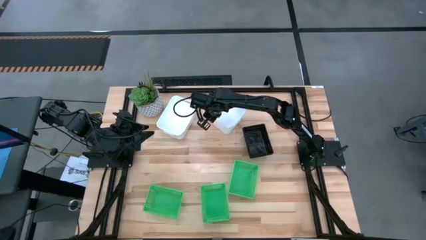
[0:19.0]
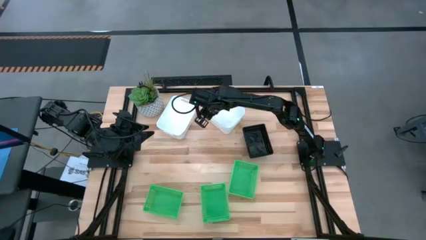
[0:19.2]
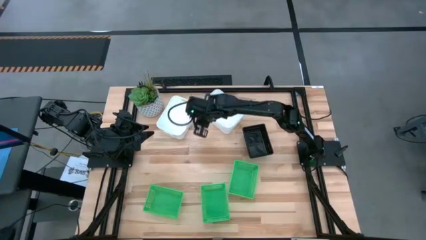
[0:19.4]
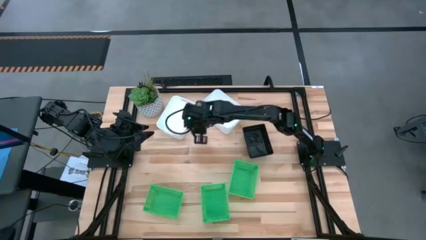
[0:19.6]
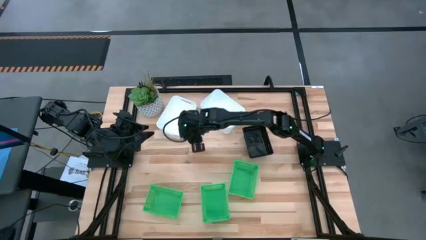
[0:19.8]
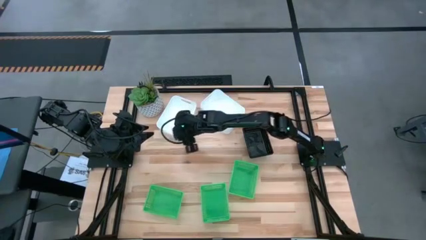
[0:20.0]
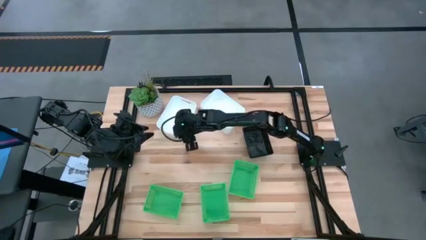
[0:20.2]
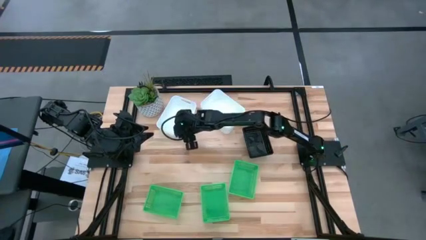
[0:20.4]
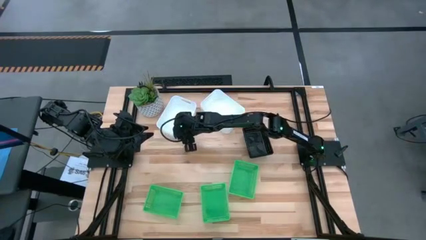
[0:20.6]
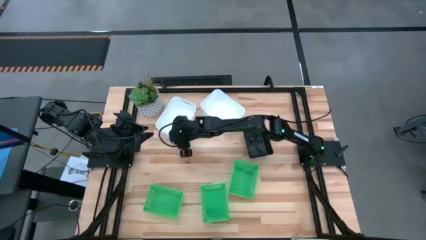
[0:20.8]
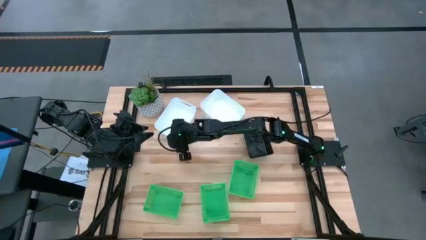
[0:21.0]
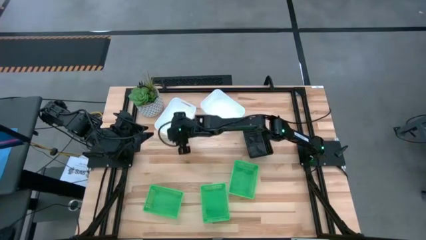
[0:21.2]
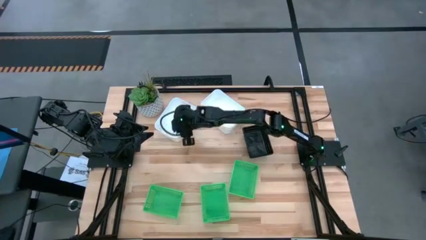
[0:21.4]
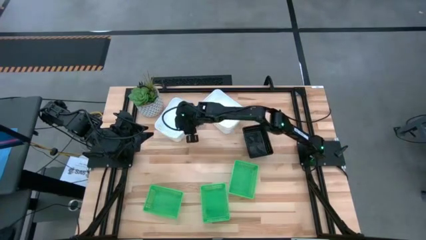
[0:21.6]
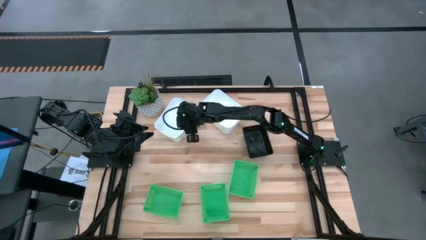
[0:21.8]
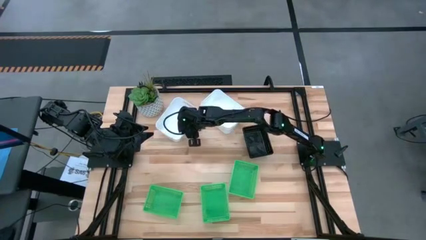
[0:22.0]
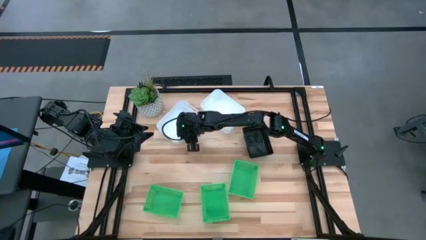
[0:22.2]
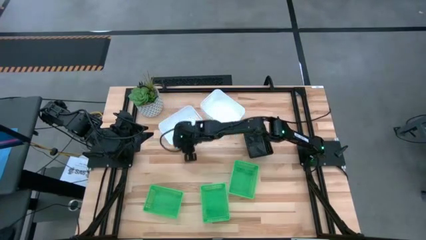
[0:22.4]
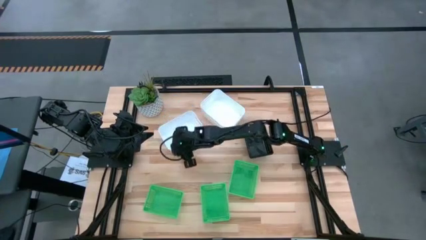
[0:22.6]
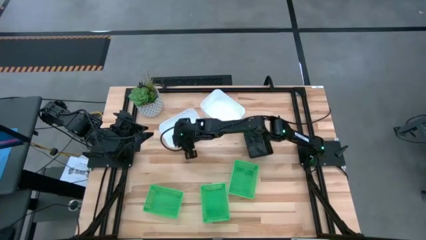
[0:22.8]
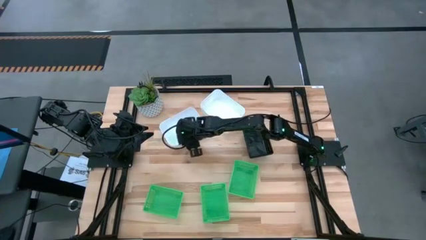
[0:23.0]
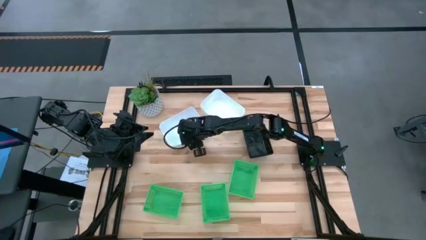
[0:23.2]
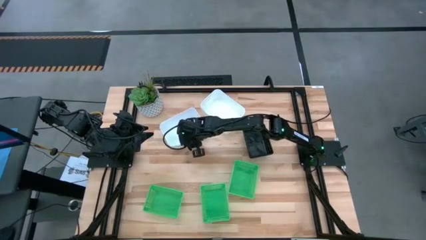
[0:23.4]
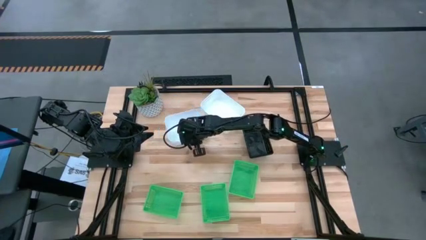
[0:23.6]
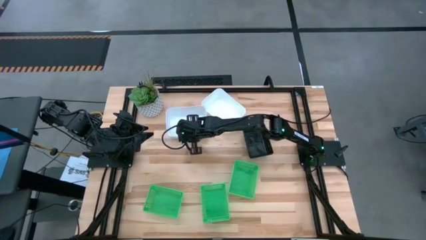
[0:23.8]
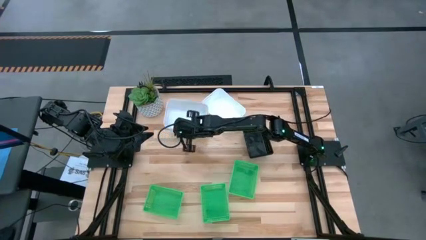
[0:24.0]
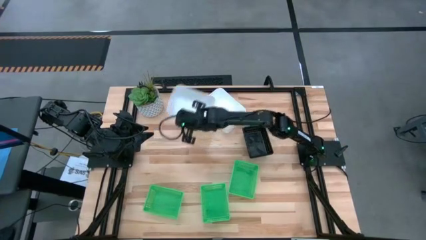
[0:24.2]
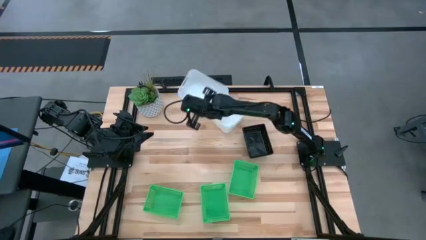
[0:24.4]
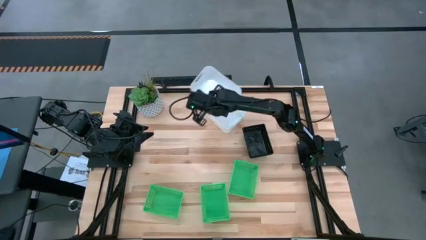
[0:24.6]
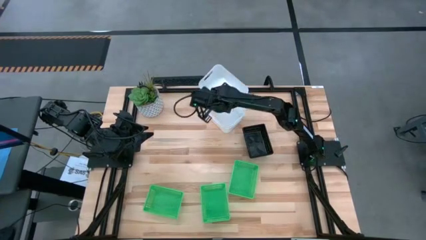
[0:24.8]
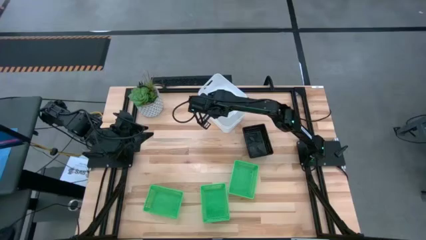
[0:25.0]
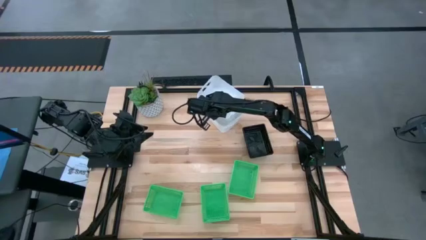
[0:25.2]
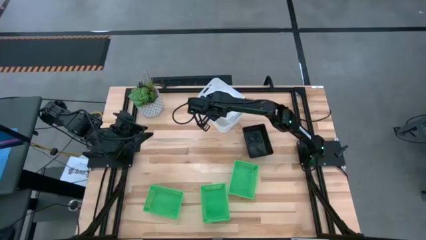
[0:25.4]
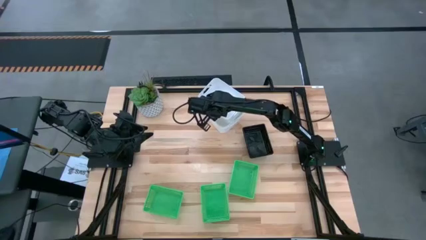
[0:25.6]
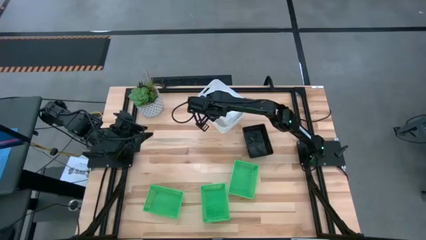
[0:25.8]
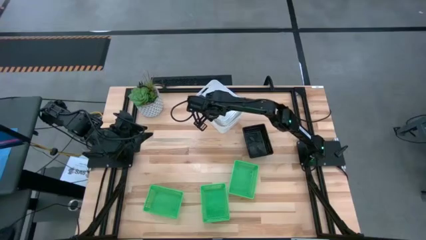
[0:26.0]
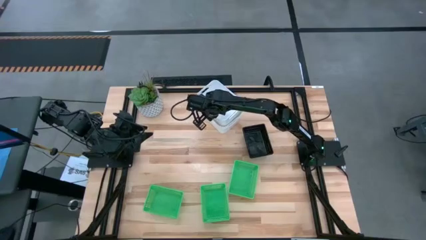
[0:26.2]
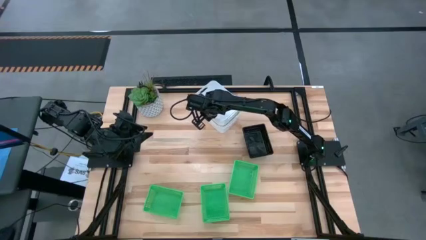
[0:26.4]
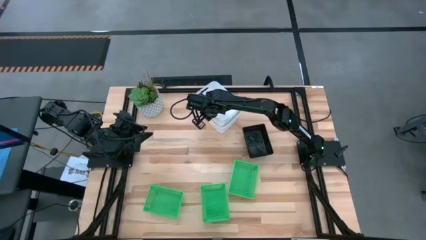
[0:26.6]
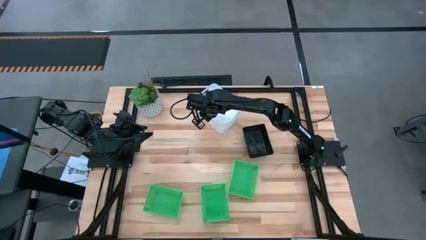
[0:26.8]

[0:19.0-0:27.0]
Stack the left white bin on the white bin

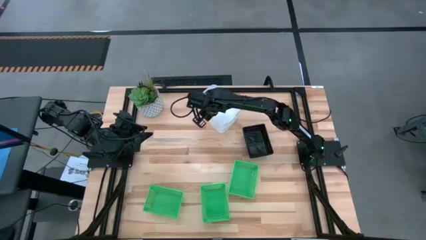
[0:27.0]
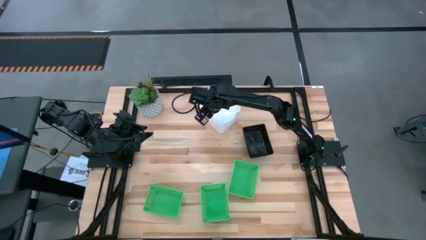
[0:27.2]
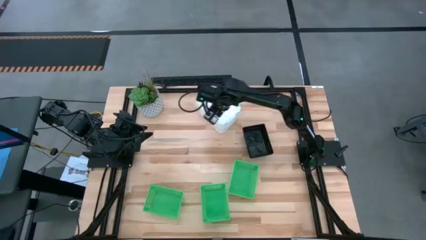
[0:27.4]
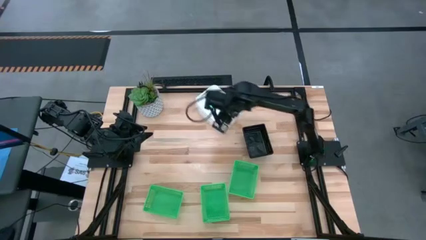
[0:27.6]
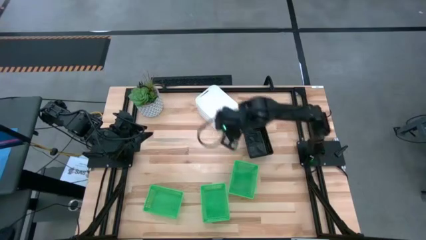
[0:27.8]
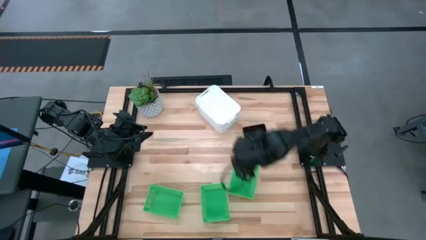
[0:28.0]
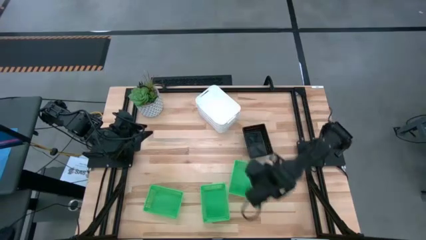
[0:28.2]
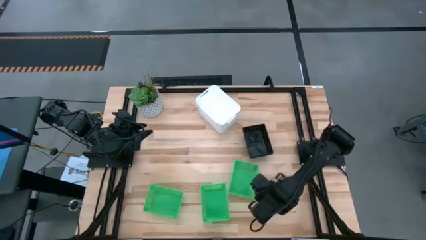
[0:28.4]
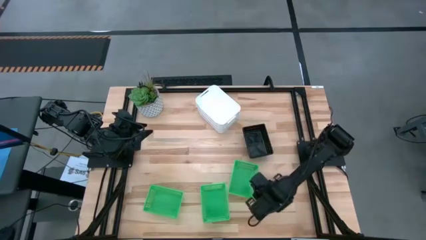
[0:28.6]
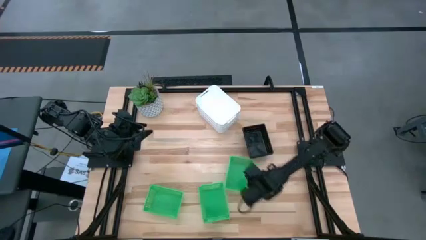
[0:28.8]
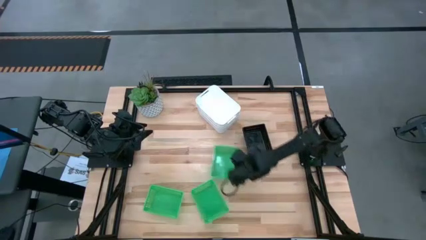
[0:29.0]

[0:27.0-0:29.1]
Move the right green bin to the center of the table

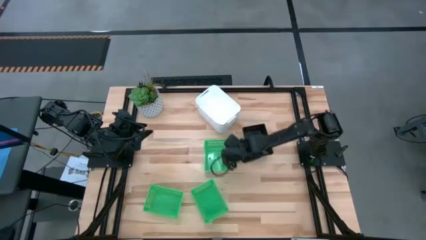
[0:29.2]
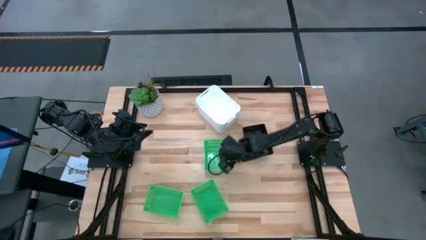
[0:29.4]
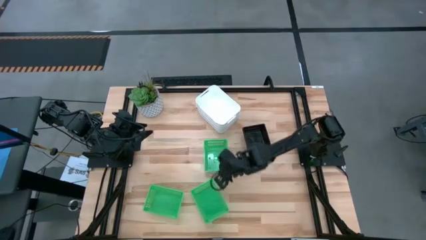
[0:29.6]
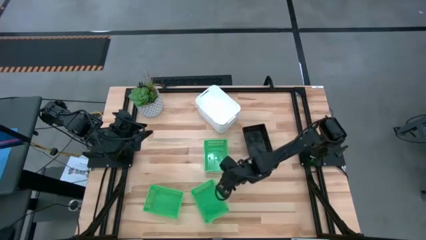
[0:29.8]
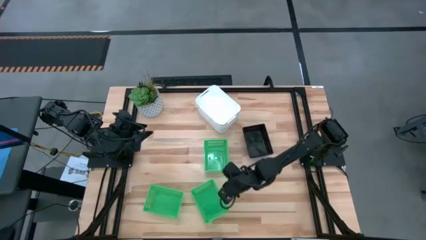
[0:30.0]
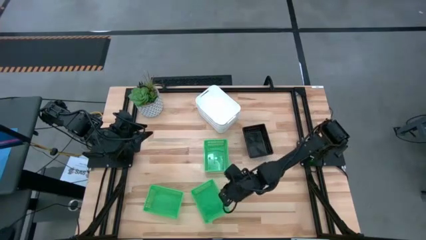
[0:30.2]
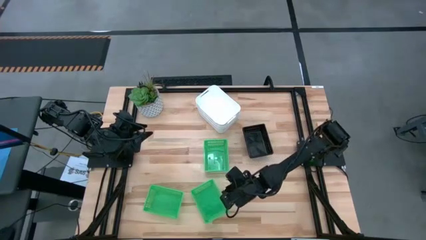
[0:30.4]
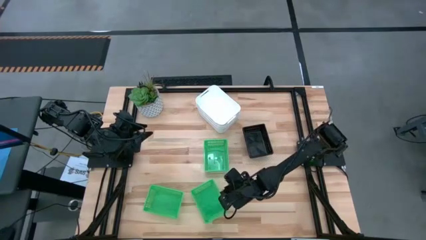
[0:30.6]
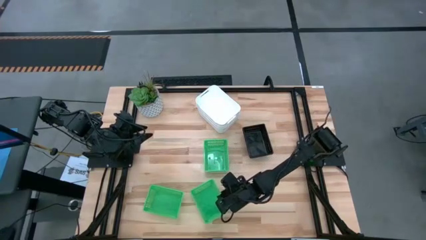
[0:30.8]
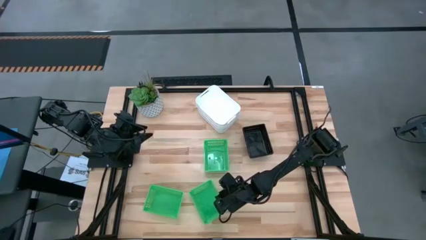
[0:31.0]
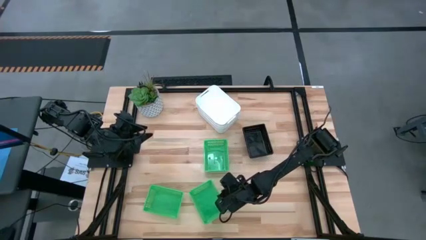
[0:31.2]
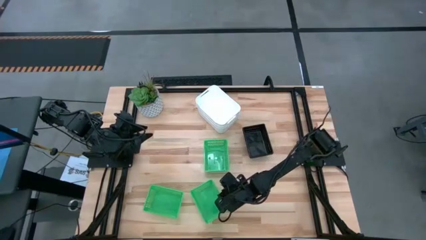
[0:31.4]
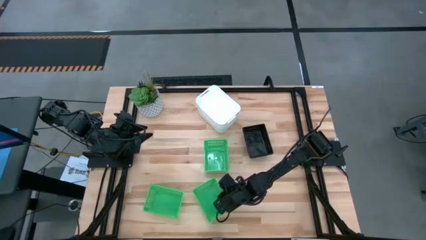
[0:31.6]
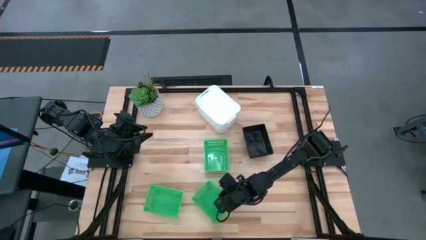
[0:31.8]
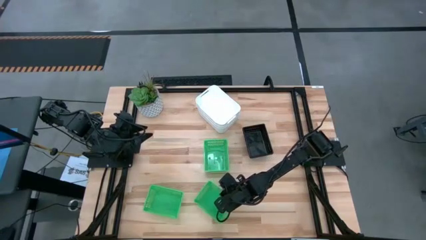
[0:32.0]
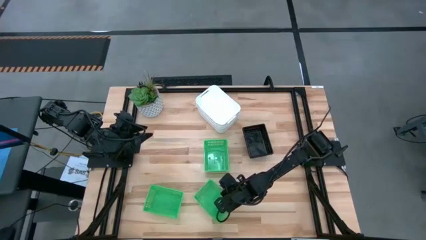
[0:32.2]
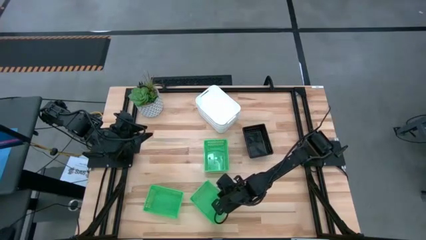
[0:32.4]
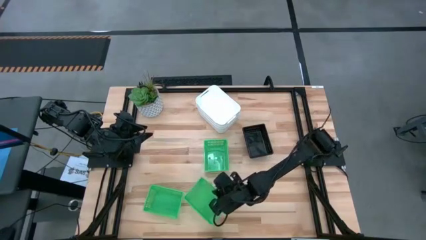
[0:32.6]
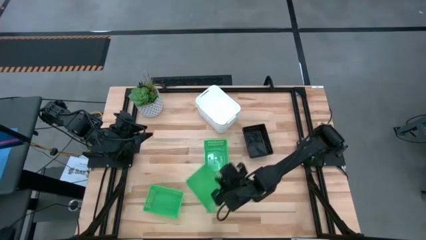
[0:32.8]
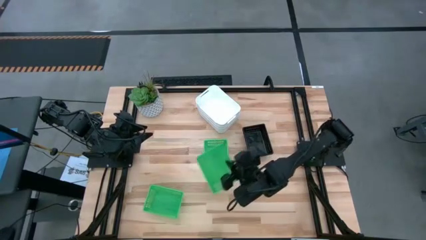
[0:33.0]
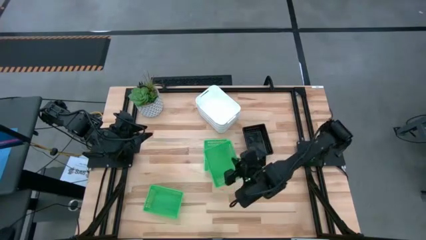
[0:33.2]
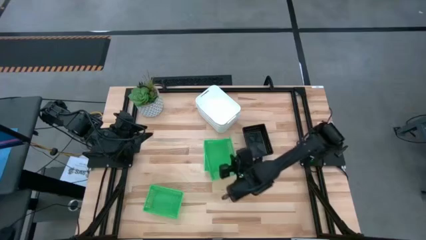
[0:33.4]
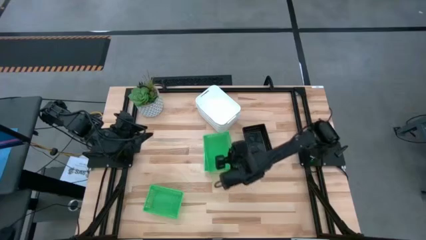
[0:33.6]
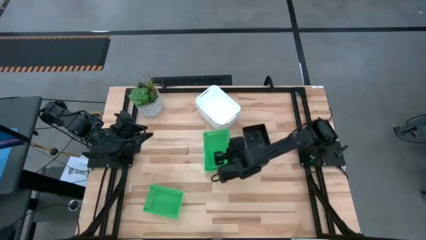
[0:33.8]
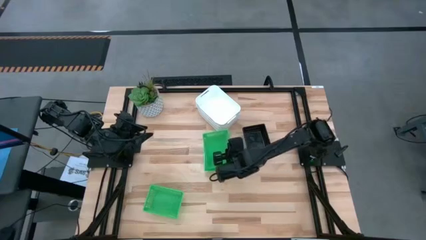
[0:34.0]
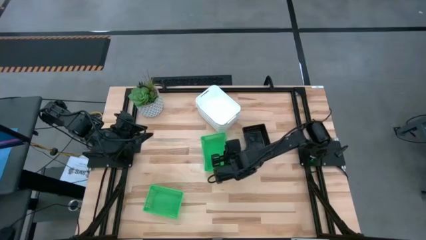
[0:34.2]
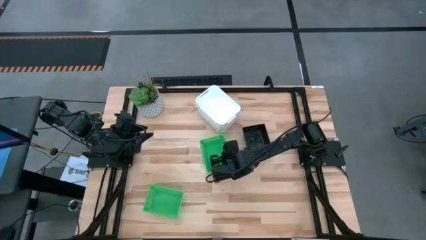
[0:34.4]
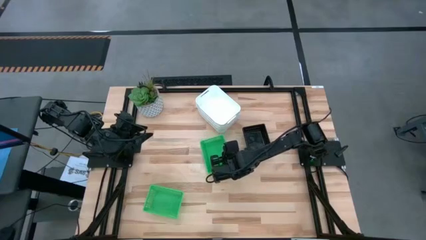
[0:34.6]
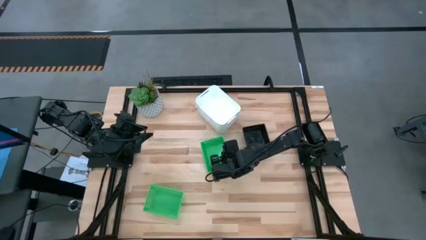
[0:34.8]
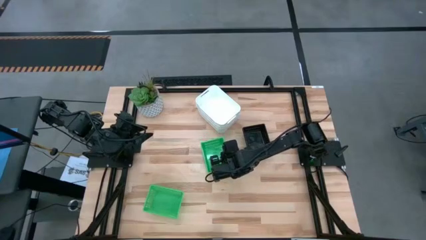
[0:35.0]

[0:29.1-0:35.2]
Stack the bottom right green bin on the top green bin
